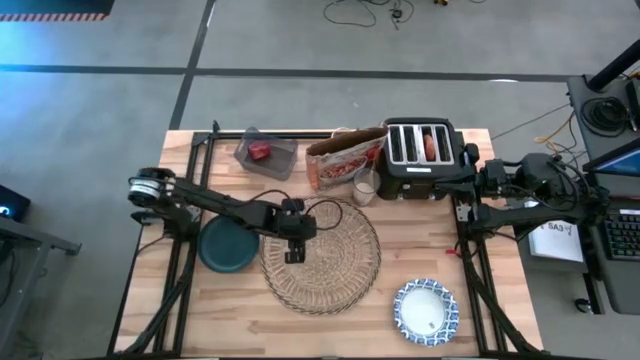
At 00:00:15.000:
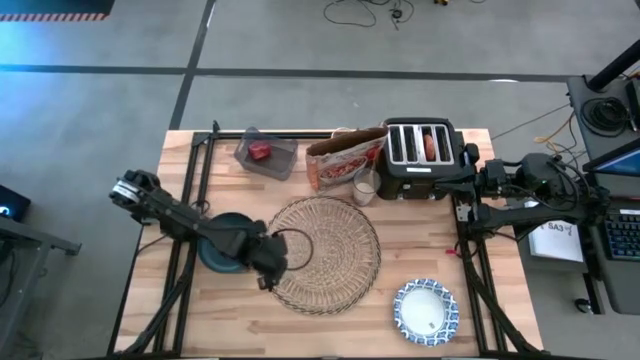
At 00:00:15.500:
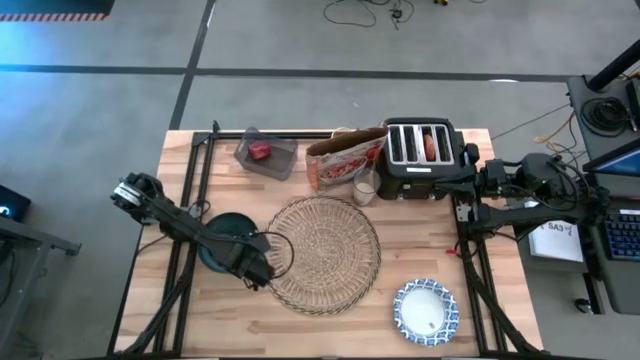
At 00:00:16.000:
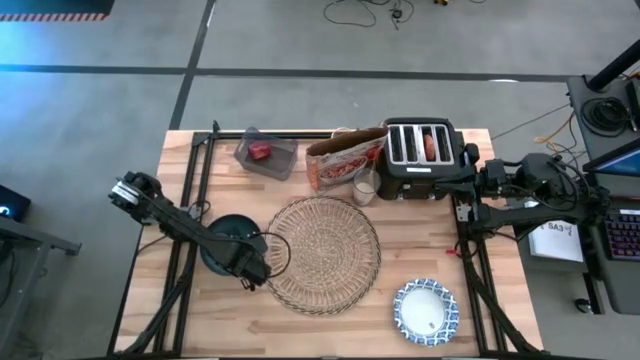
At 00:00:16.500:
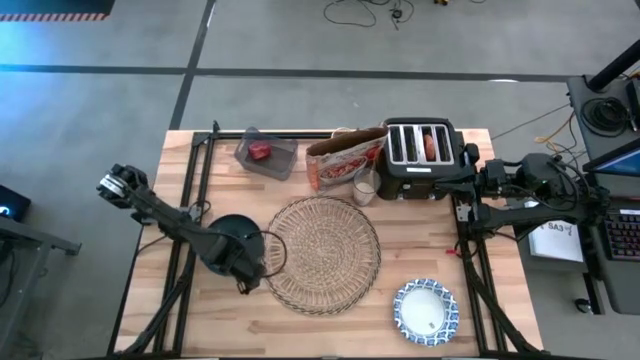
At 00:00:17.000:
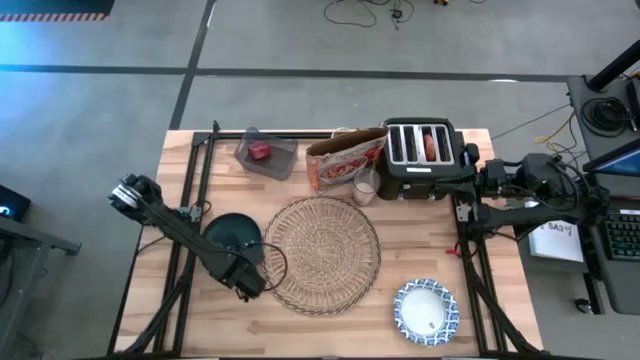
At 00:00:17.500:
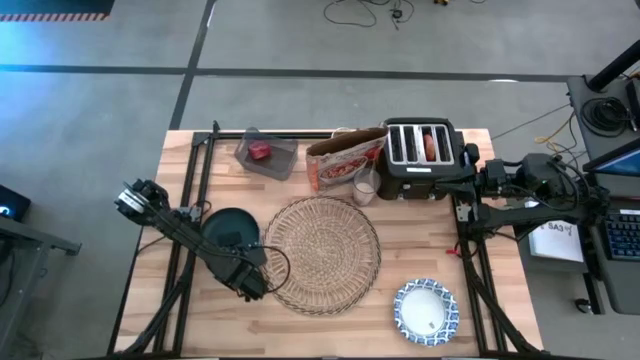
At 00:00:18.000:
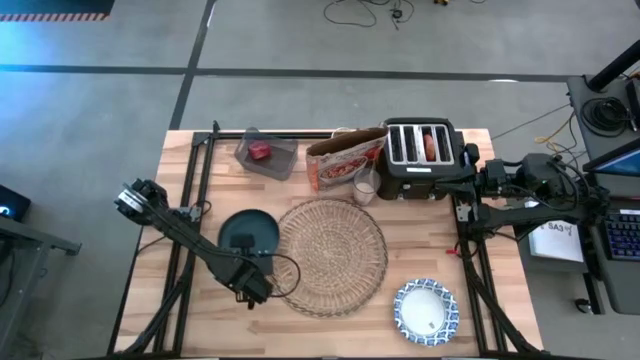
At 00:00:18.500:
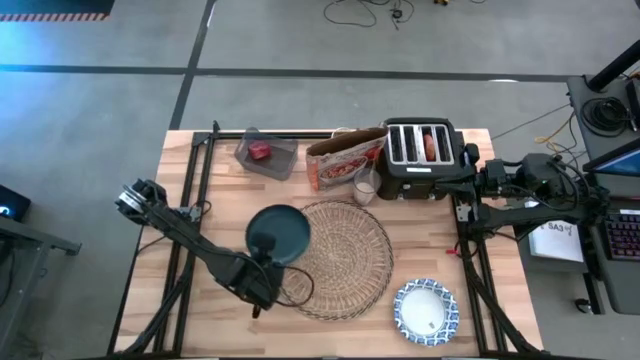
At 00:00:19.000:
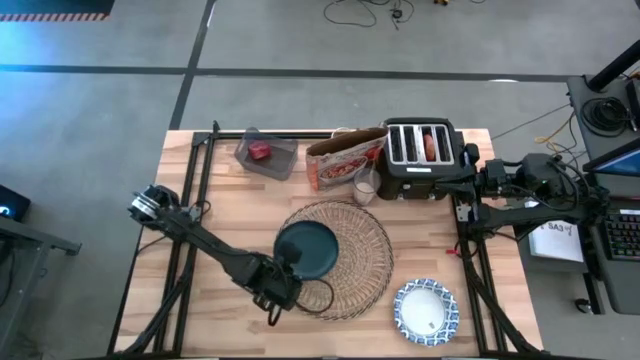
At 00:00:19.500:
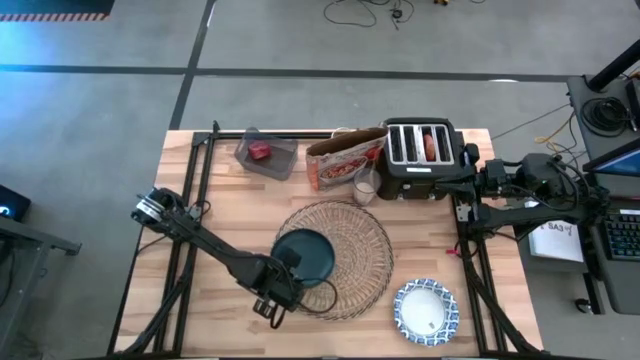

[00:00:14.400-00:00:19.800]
Task: Arrange a breakfast setting
Put the green plate on the brown table mat

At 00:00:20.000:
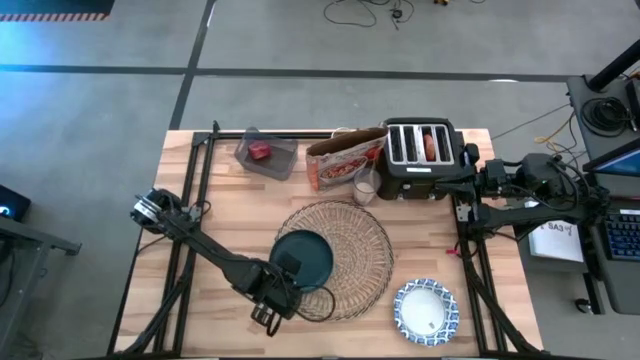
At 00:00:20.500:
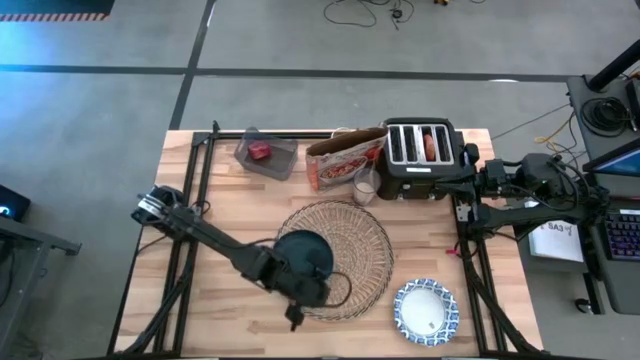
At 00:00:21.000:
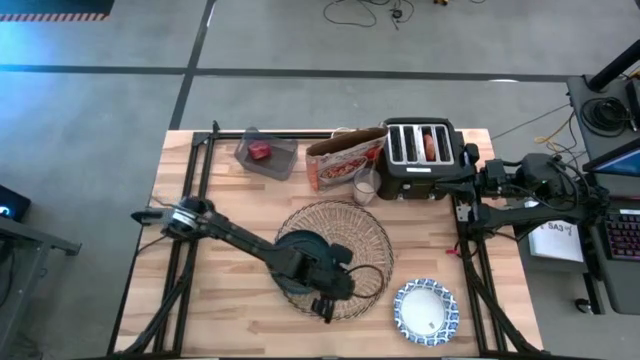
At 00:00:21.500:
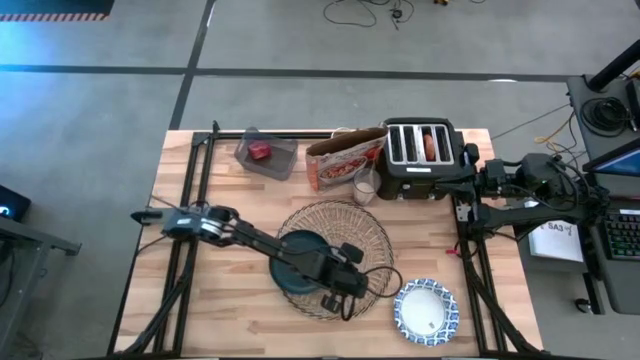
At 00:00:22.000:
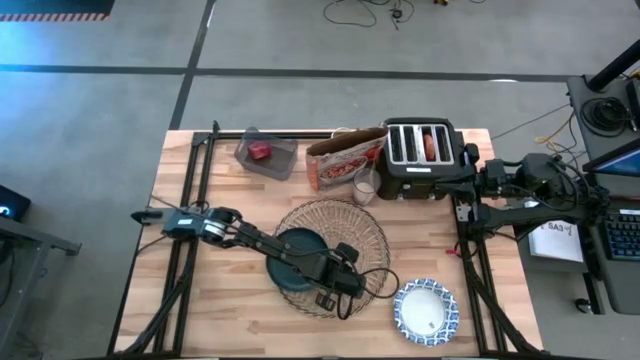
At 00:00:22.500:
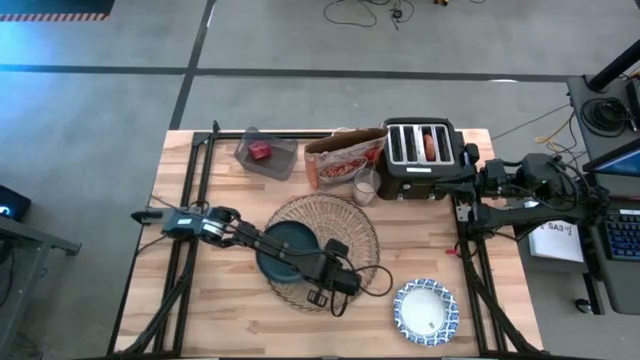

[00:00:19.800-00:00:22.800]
Adjust the brown table mat

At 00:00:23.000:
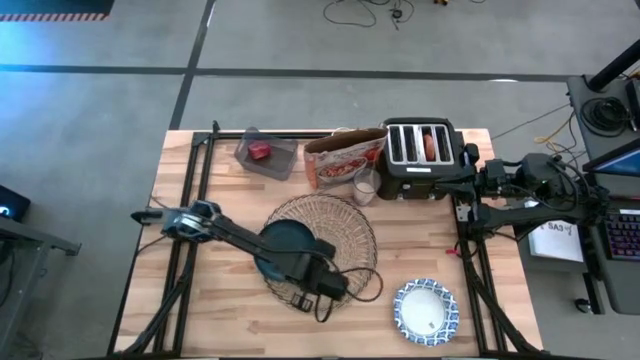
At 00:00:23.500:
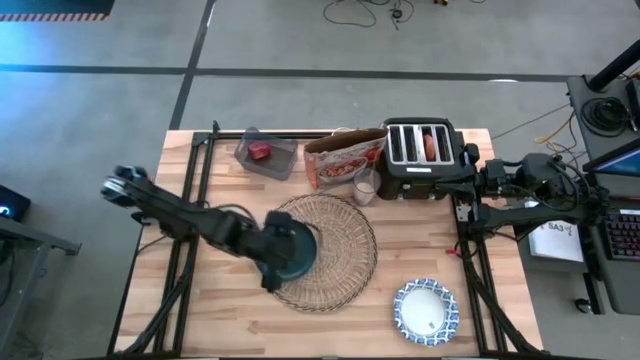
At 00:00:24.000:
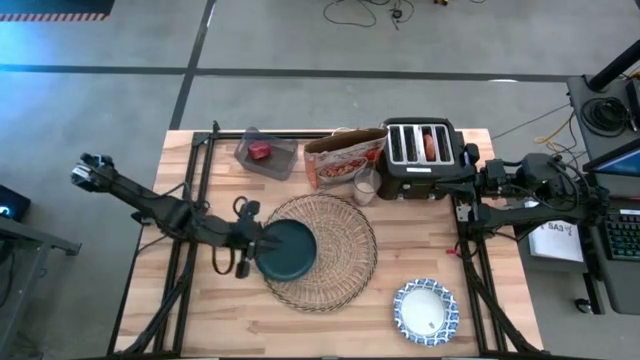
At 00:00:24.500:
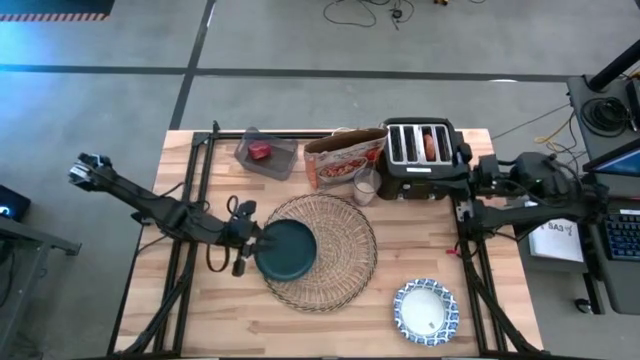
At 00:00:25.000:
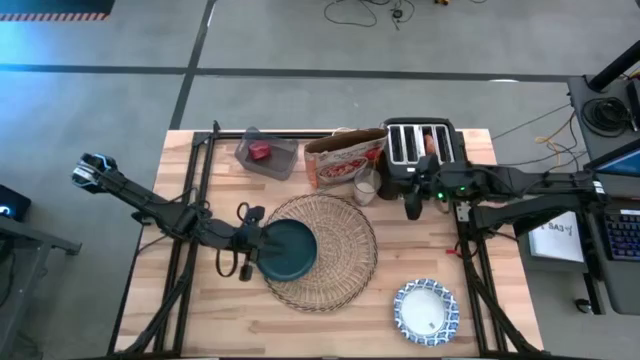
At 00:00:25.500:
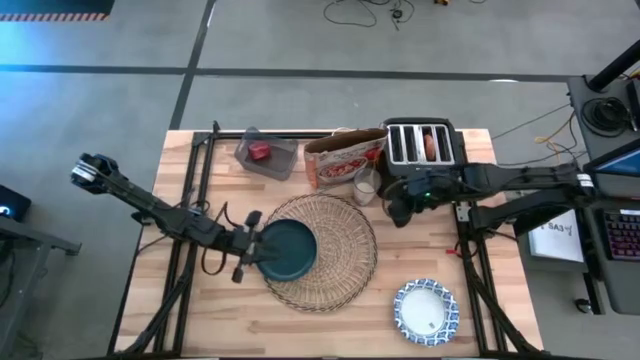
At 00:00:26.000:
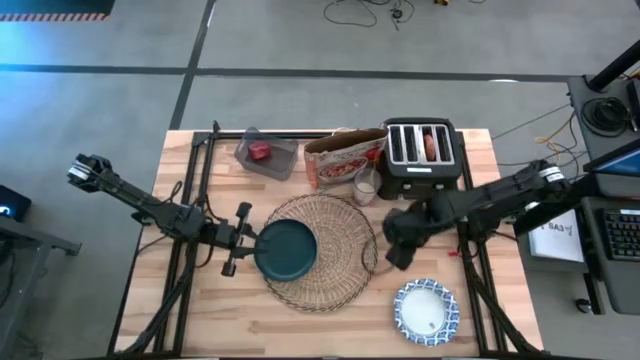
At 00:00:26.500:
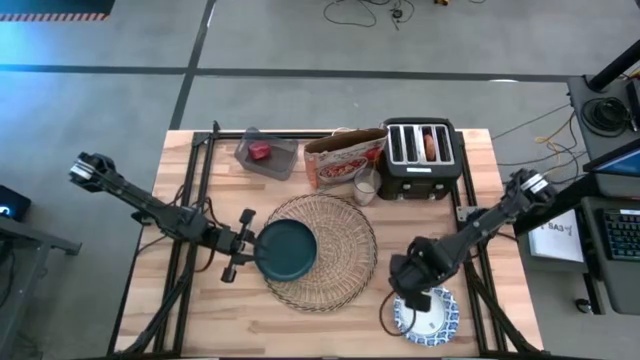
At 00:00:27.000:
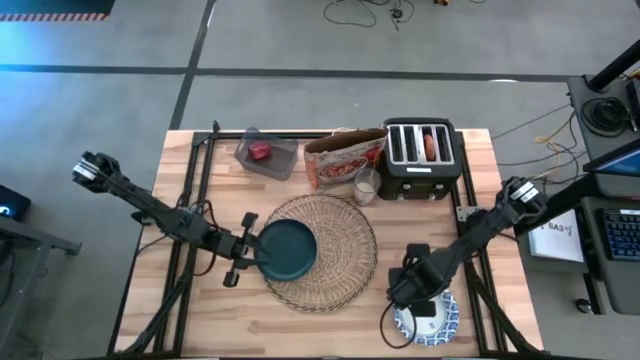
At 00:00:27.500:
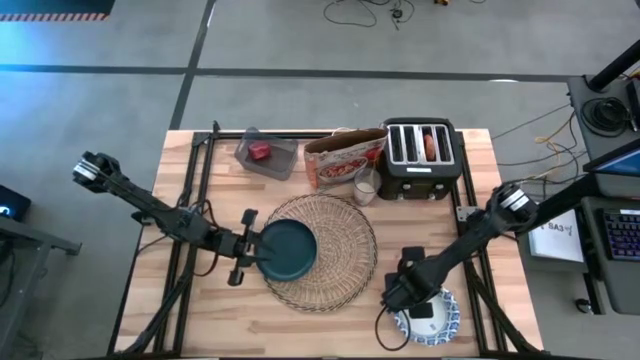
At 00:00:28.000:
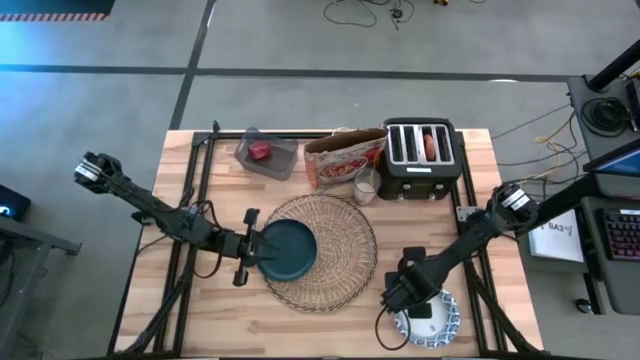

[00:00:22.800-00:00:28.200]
Put the white patterned bowl on the brown table mat

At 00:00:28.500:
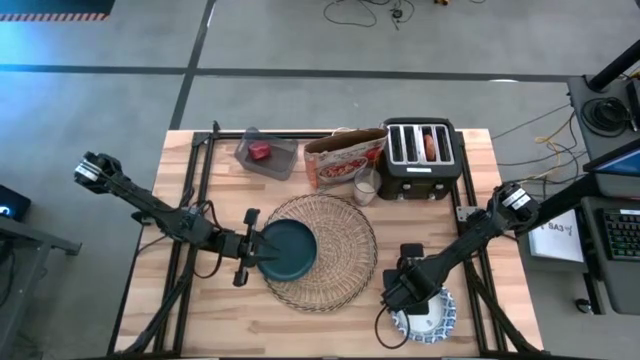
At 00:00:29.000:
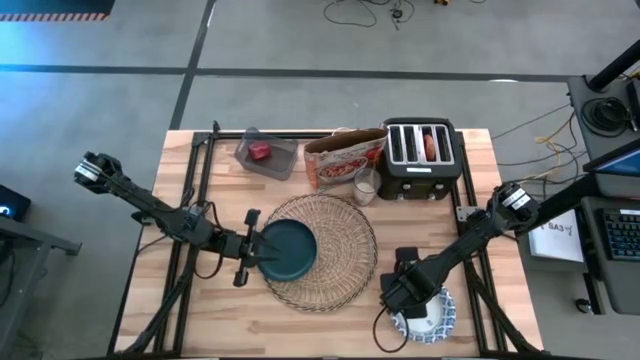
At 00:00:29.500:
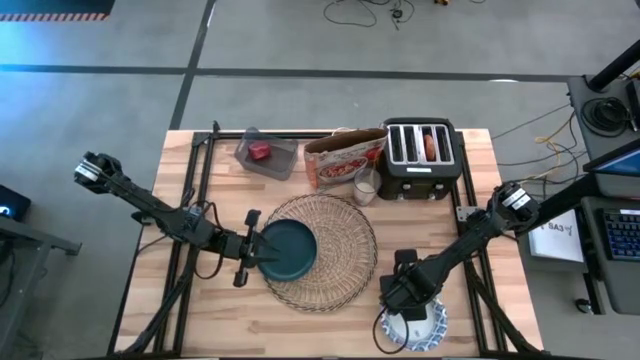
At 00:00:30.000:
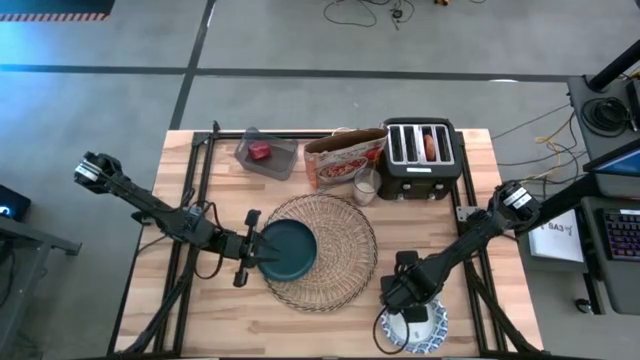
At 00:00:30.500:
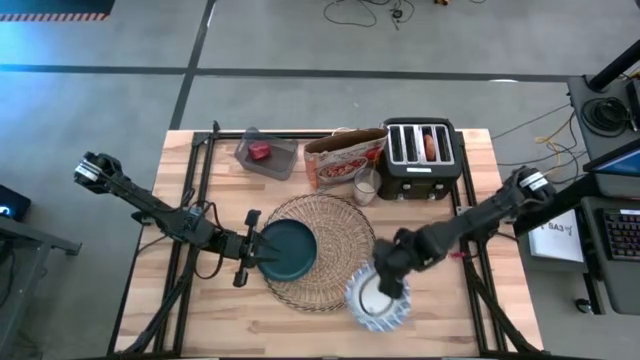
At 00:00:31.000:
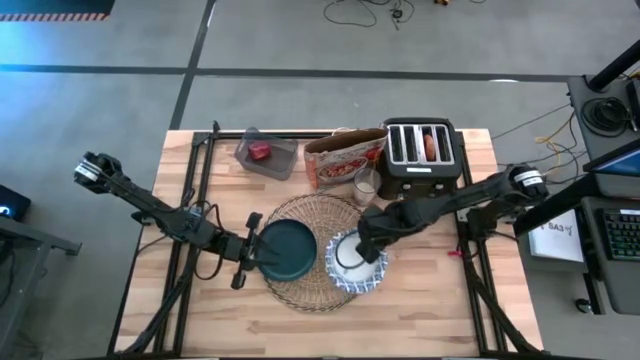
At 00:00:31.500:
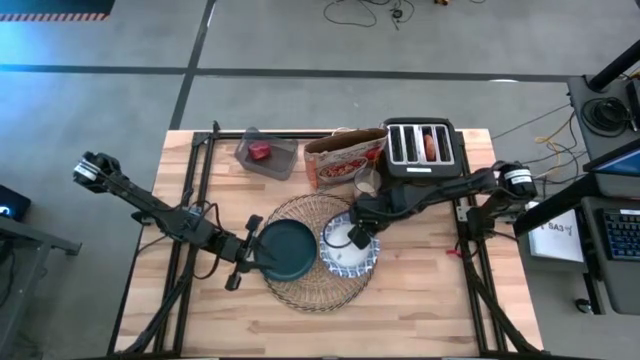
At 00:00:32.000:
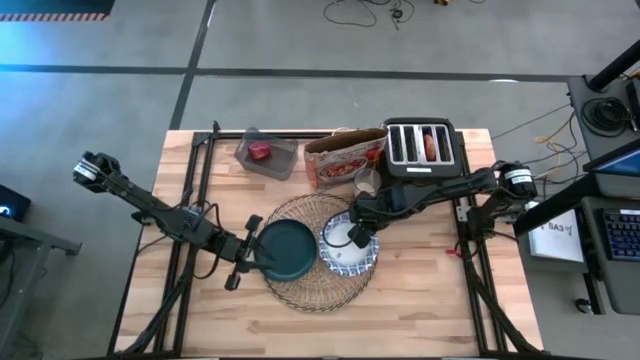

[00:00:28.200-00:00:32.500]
Put the white patterned bowl on the brown table mat

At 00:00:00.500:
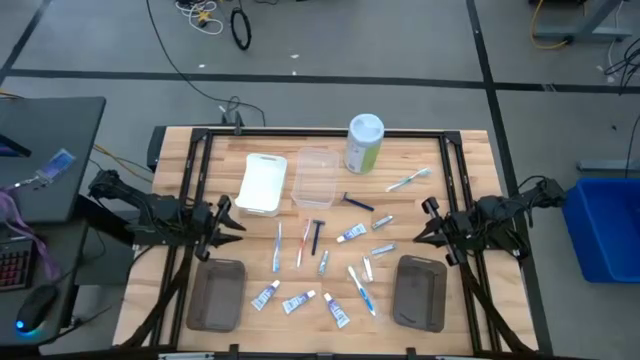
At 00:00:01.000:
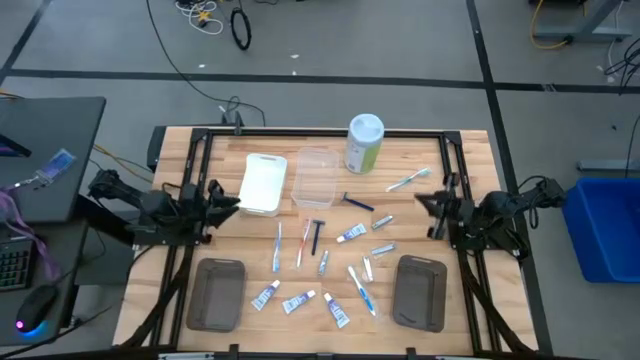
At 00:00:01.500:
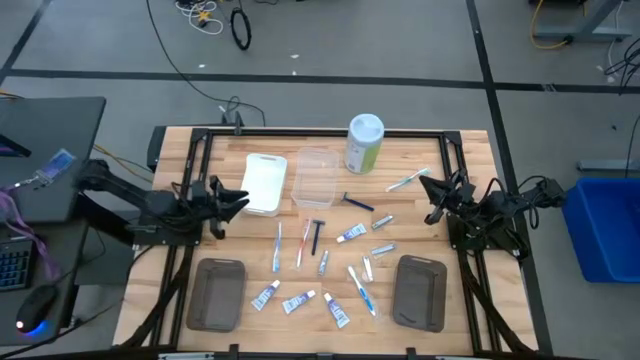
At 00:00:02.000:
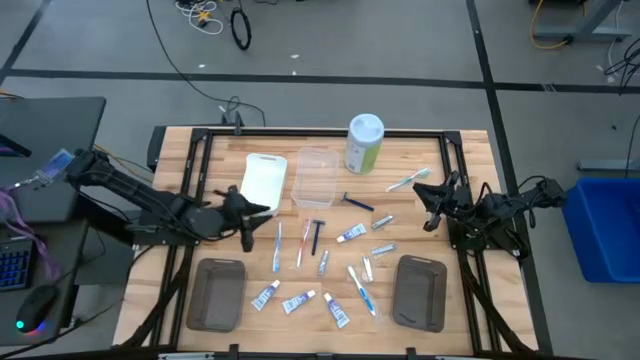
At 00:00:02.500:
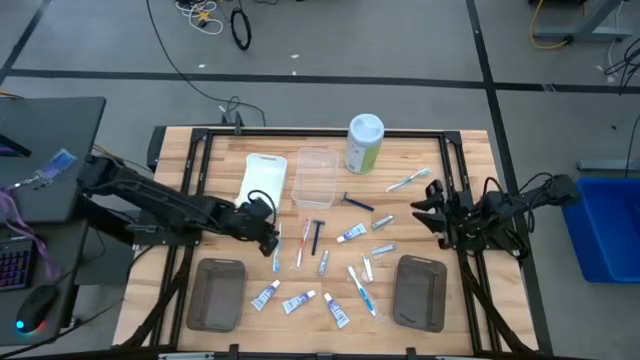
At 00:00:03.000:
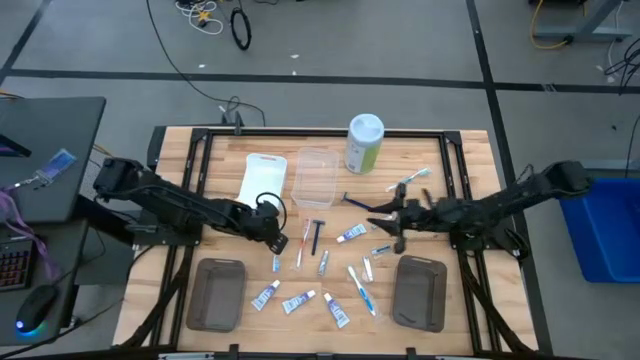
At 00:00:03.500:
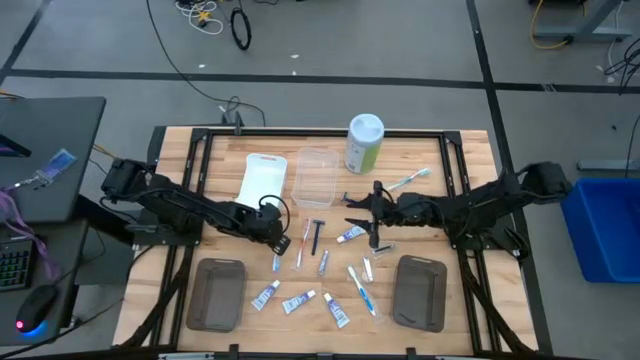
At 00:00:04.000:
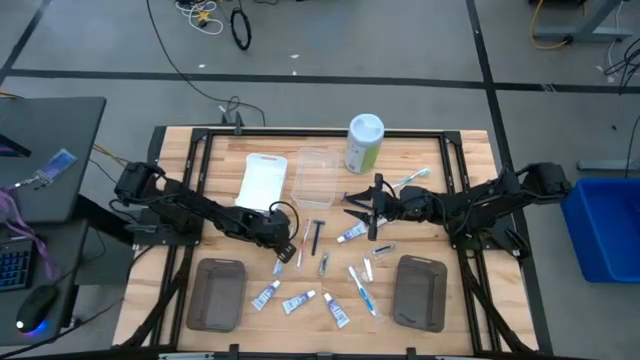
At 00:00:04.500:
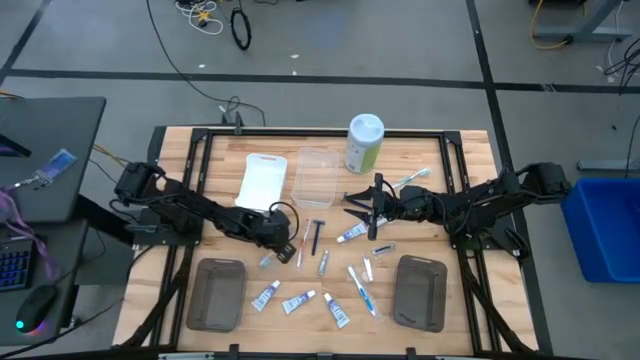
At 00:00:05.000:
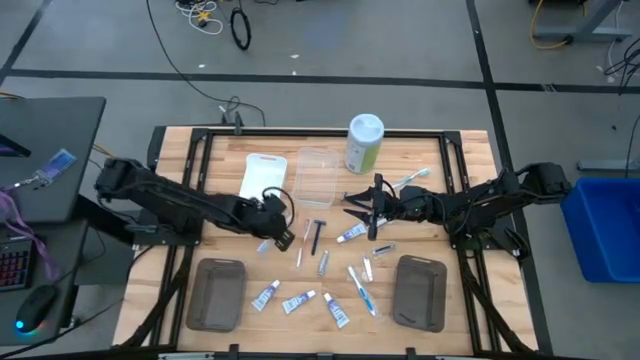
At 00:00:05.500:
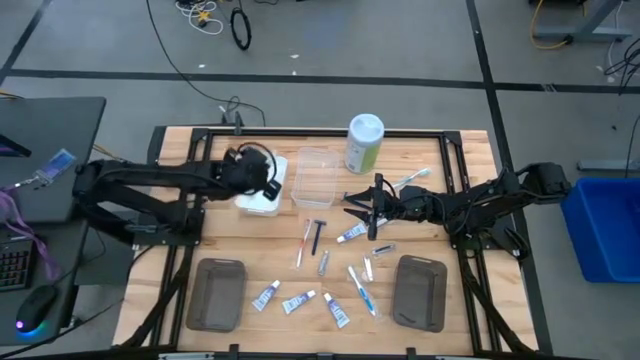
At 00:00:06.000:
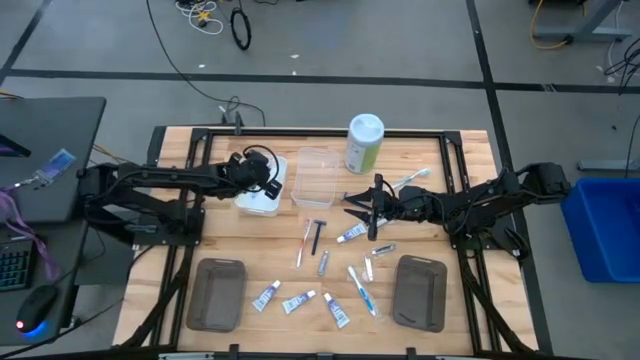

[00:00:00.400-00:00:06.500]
Task: Pick & Place Travel size toiletries
Put the left blue and white toothbrush into the white bin
